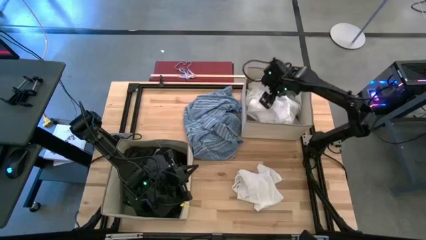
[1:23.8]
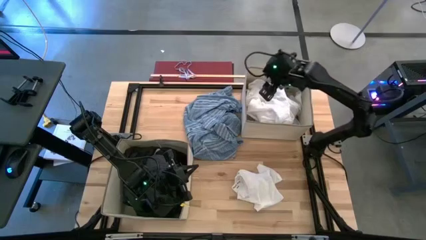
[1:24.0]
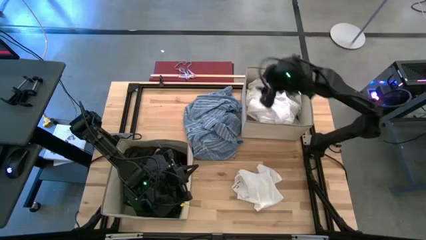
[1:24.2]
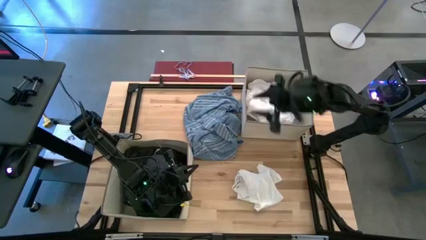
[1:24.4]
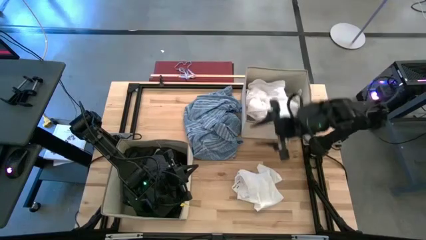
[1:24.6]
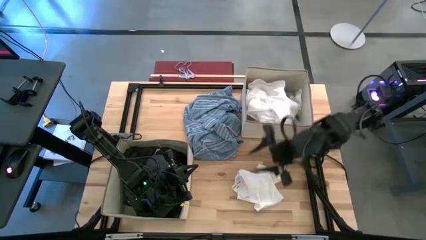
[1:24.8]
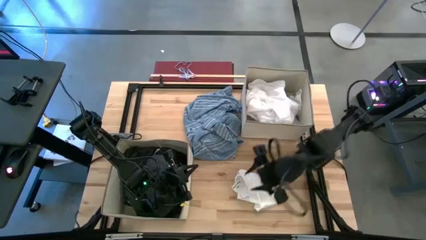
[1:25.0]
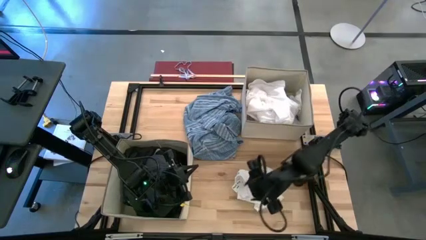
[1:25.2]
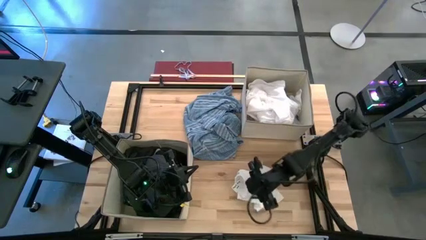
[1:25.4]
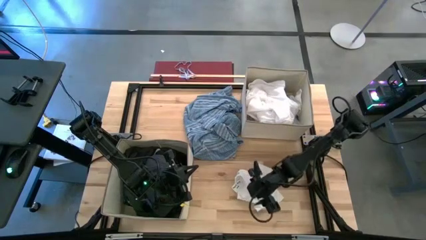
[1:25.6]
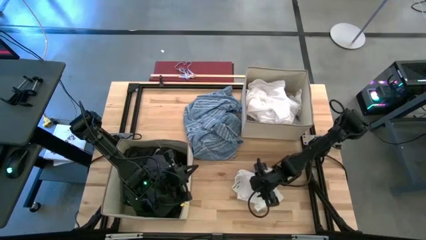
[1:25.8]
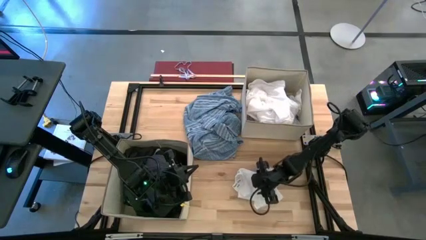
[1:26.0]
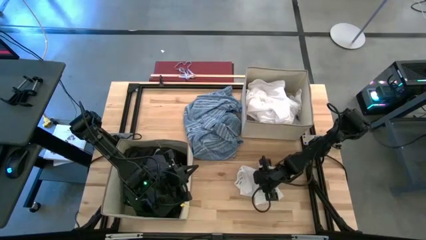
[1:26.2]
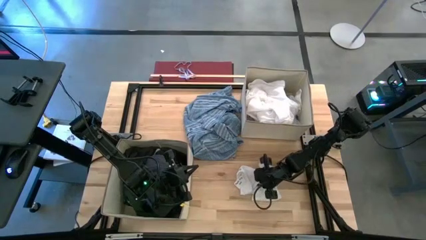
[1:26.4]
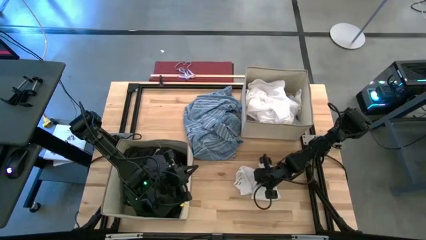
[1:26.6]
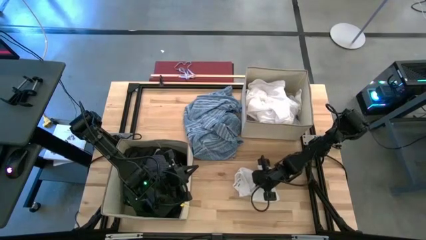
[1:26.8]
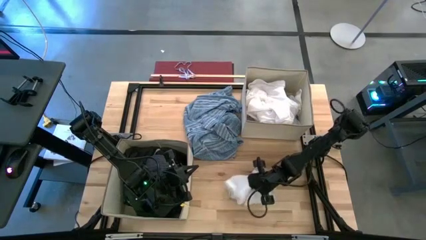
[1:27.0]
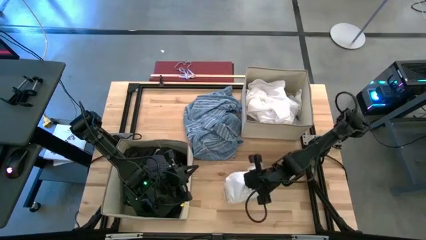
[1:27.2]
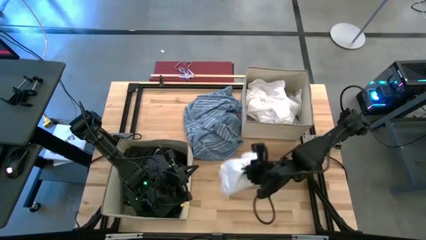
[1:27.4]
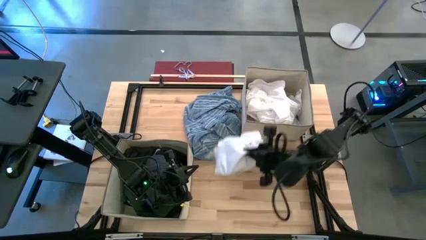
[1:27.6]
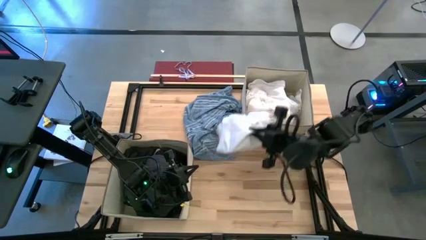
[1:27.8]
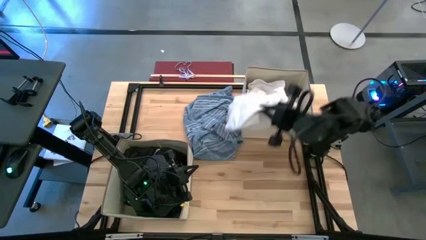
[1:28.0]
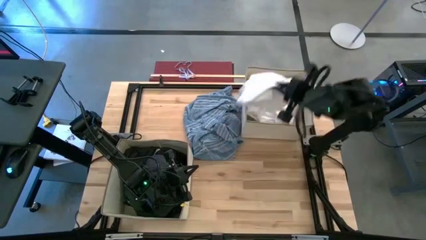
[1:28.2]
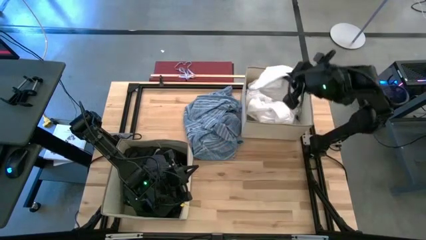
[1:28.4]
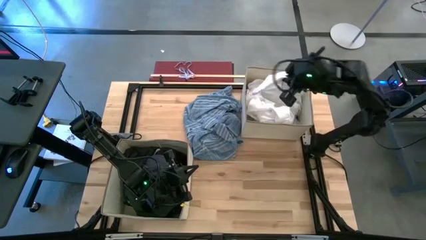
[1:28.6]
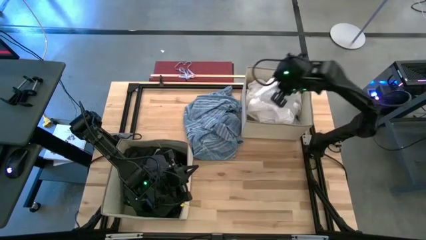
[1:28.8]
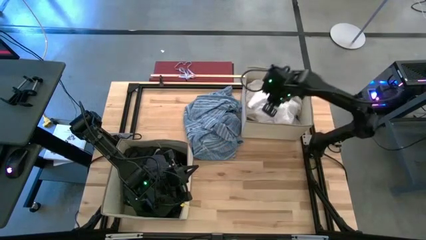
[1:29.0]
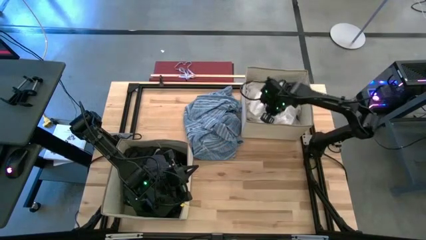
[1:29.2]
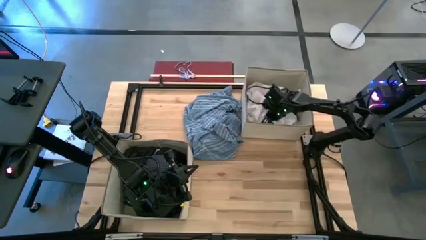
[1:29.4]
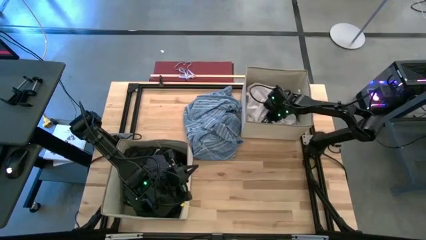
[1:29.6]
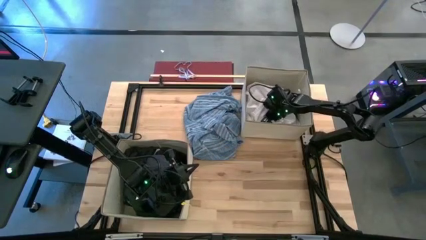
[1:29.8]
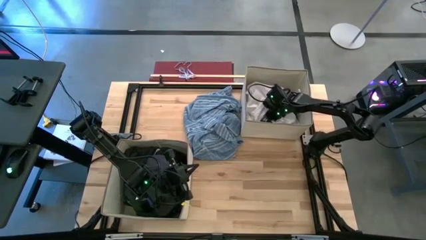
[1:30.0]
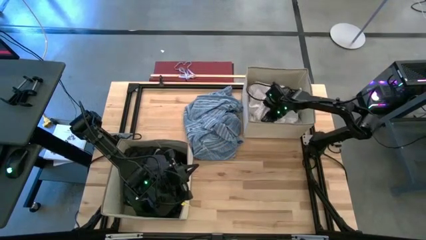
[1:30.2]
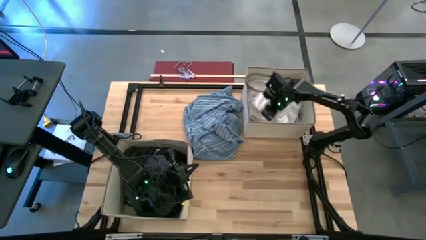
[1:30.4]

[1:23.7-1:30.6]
Task: Sort clothes
Put the white underwear into the top laundry organizer

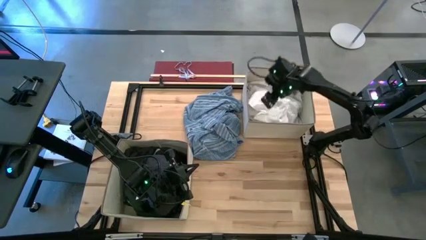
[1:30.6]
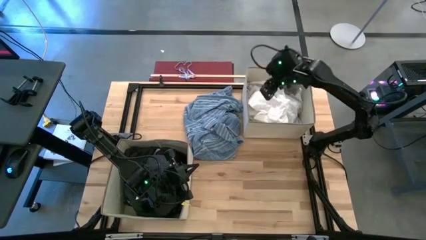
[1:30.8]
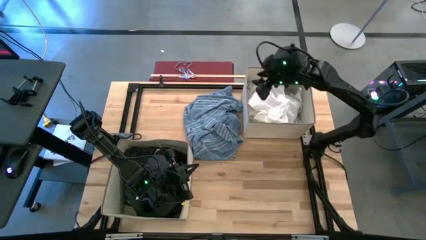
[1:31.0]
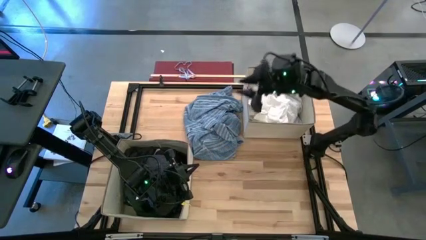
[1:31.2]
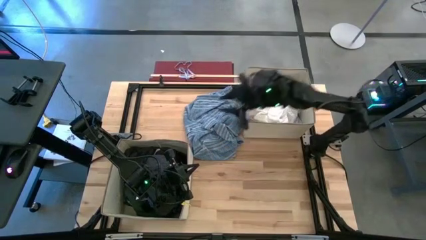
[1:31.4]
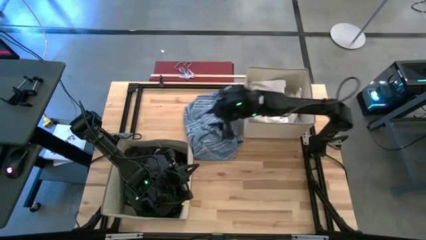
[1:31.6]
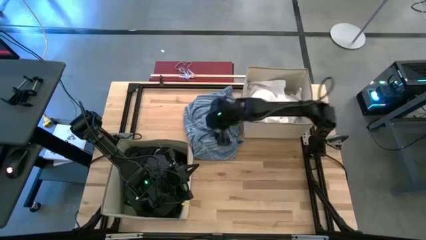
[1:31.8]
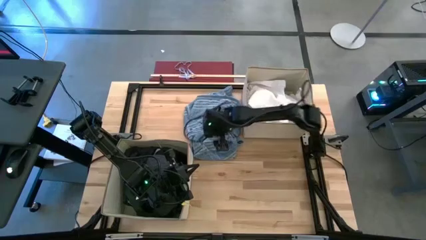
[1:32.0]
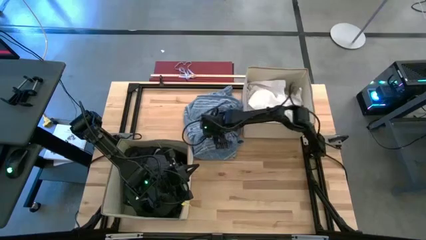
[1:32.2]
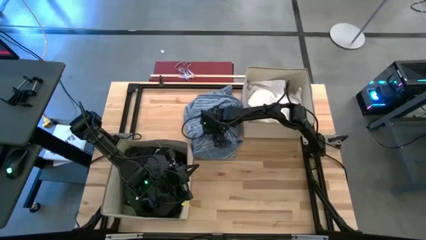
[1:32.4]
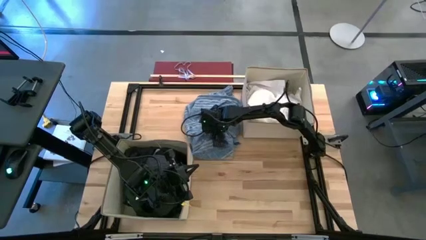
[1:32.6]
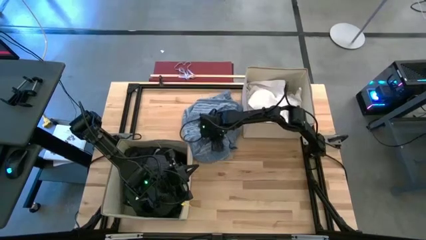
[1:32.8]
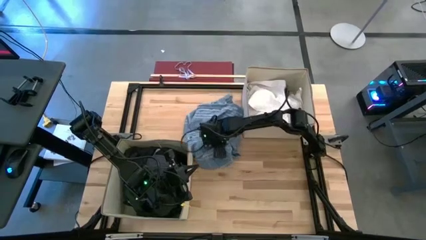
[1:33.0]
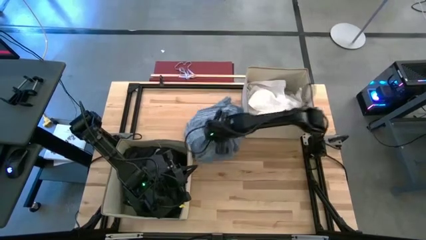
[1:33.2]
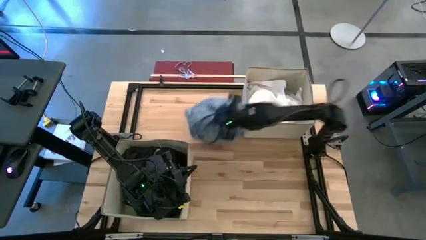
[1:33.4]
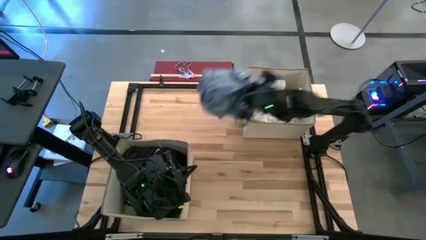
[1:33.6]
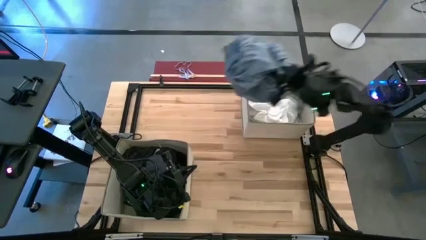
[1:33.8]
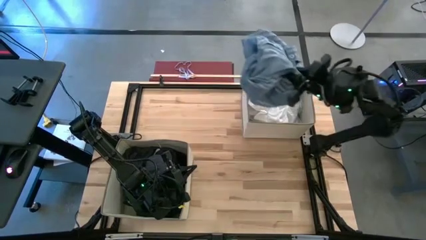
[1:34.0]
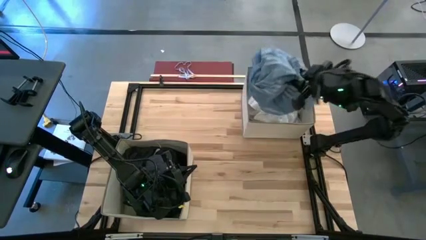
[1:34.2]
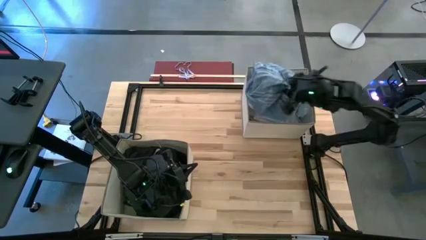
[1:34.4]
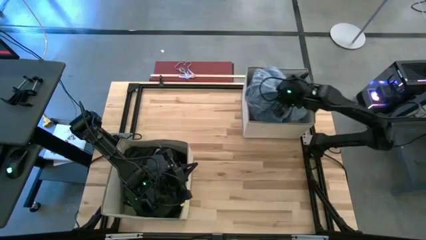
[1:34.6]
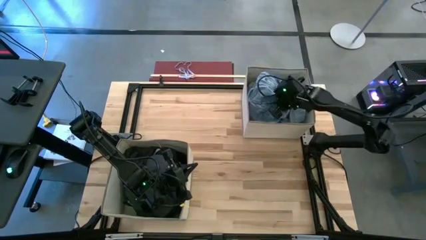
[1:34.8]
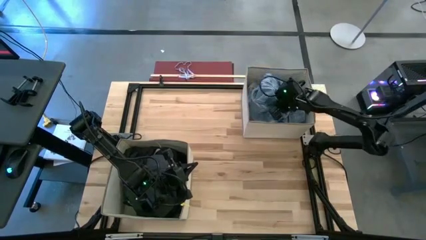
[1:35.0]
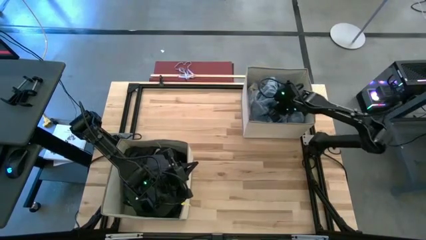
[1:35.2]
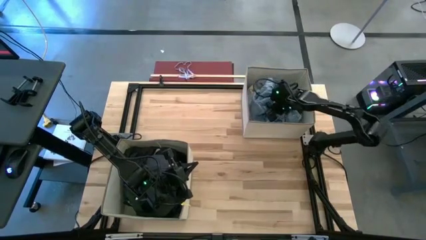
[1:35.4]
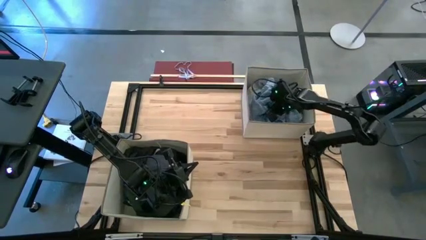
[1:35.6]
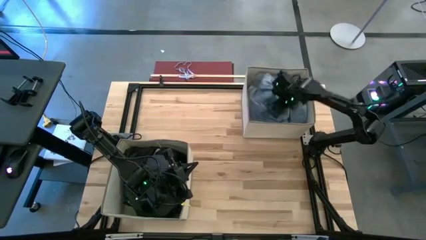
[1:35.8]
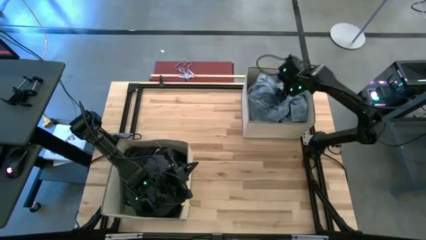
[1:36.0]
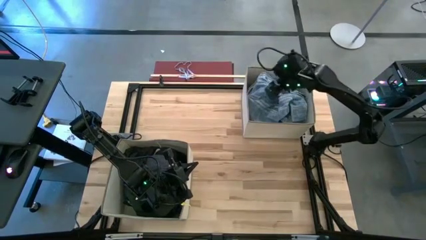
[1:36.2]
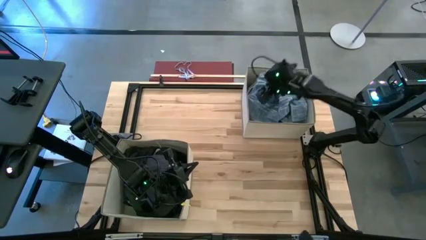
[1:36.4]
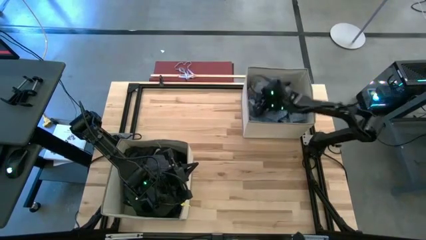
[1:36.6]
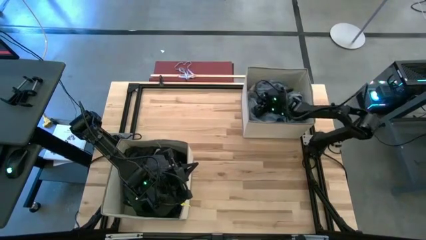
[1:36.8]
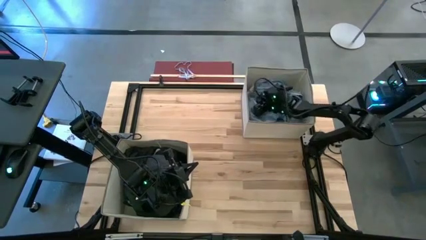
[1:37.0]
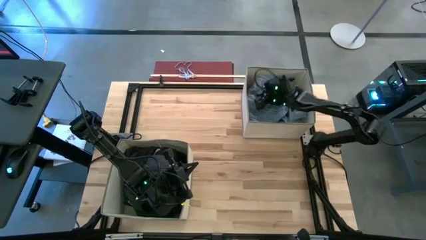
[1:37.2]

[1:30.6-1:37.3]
Put the light blue shirt into the top laundry organizer

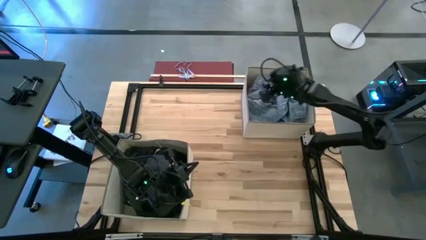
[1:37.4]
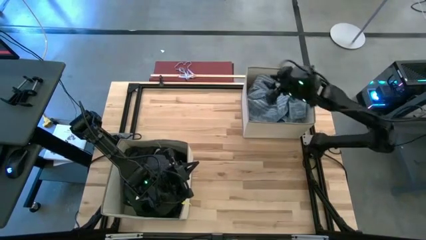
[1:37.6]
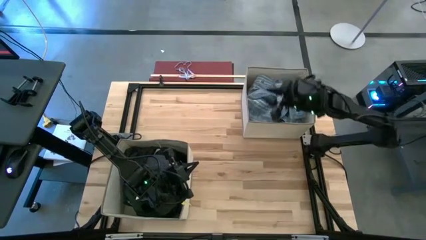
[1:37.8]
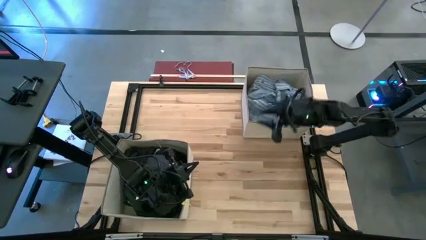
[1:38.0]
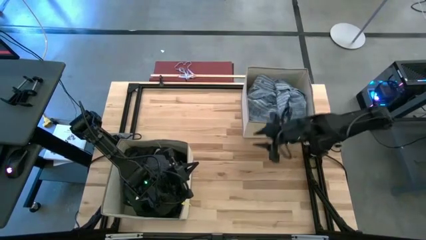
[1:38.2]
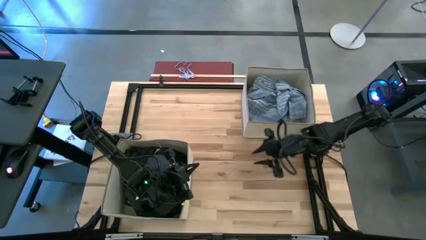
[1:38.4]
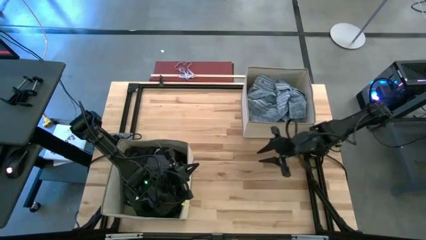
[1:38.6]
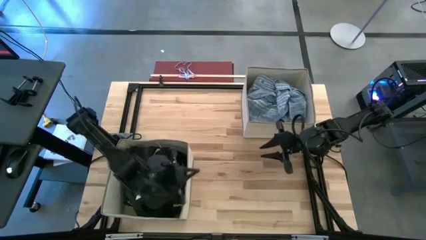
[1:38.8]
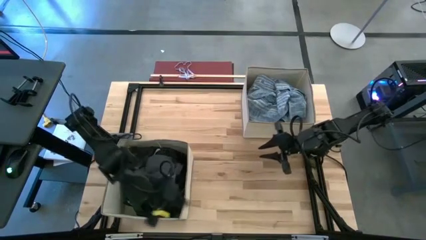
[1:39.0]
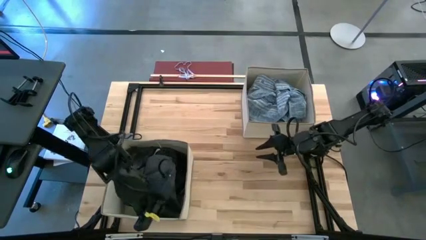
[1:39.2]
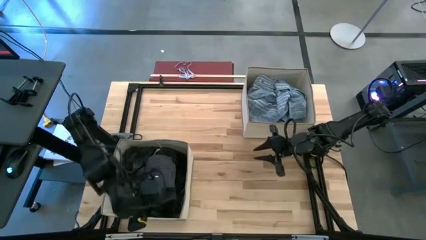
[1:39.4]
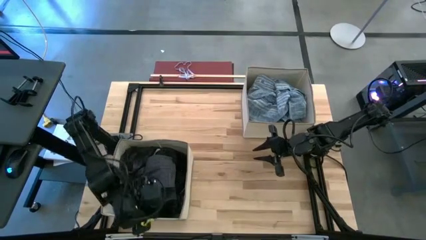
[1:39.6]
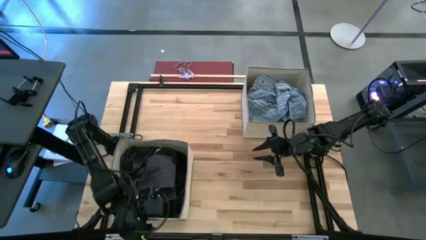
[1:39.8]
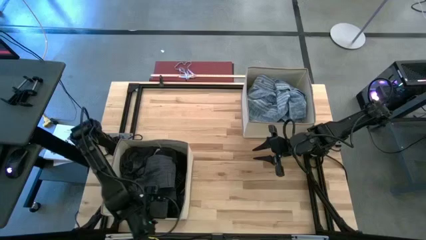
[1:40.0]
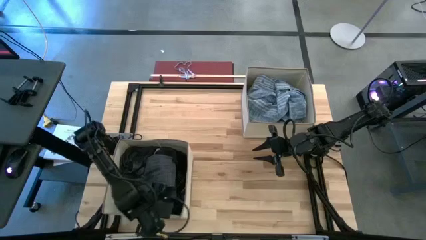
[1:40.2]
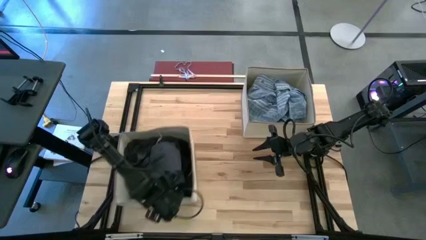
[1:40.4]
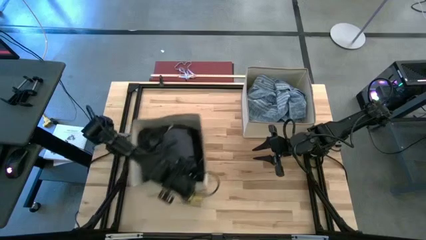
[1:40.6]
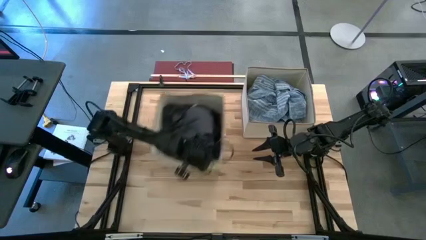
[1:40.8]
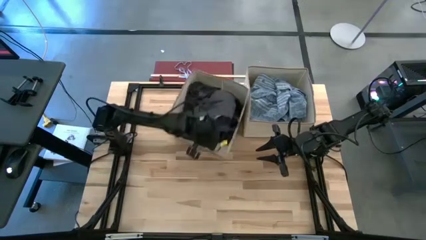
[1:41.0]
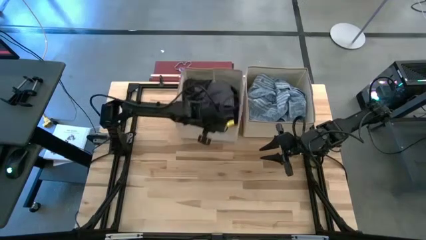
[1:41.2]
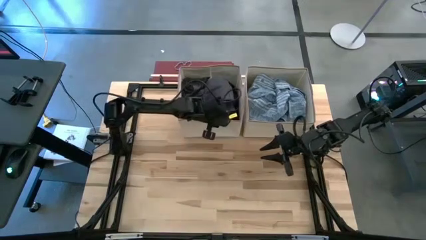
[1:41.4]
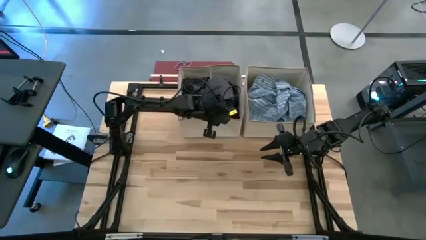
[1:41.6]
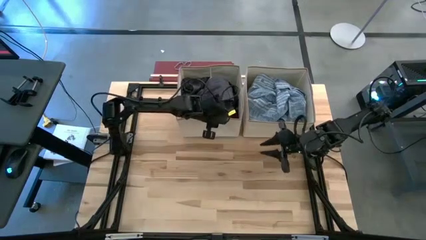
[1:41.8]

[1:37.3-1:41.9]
Move the bottom laundry organizer beside the top laundry organizer
